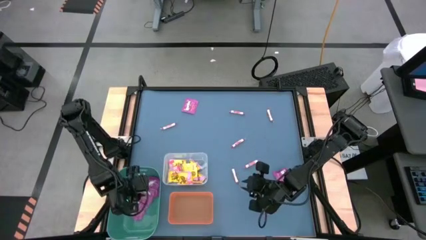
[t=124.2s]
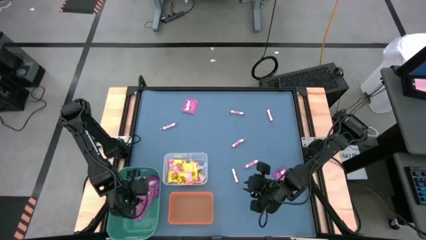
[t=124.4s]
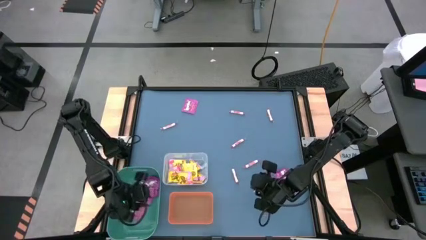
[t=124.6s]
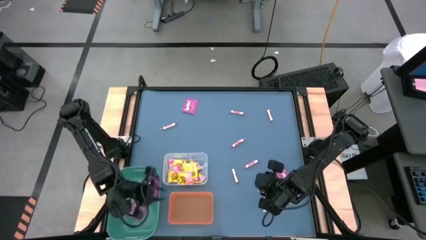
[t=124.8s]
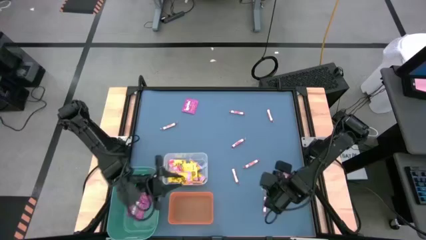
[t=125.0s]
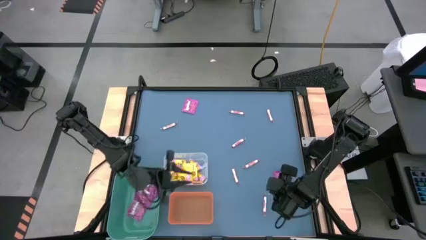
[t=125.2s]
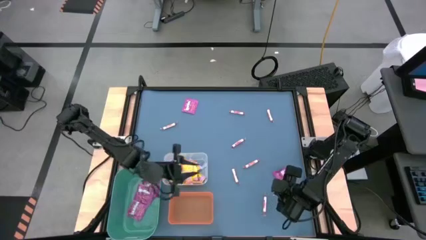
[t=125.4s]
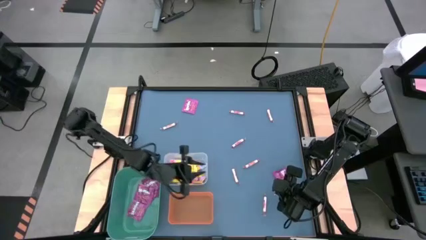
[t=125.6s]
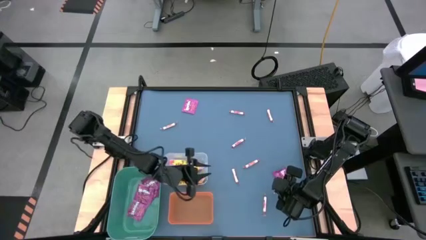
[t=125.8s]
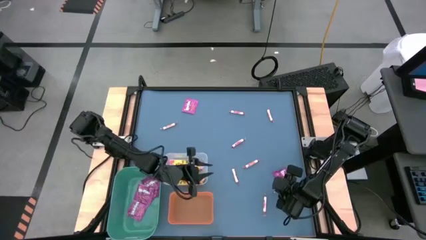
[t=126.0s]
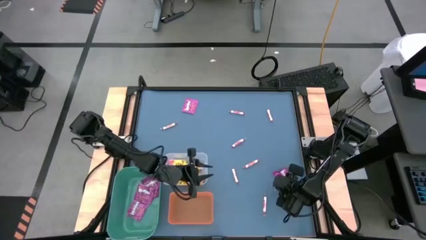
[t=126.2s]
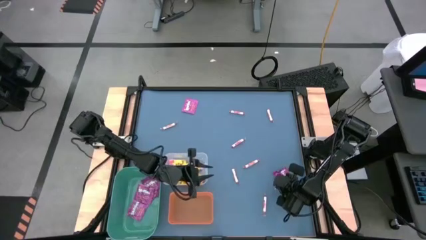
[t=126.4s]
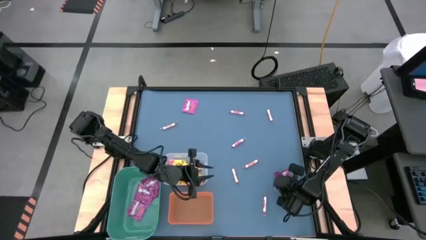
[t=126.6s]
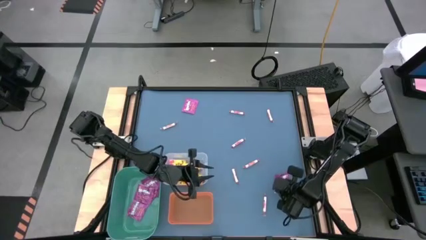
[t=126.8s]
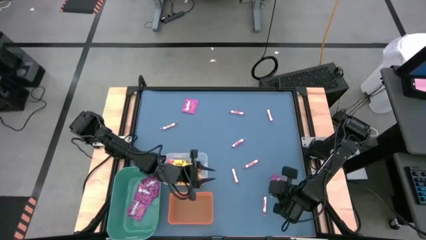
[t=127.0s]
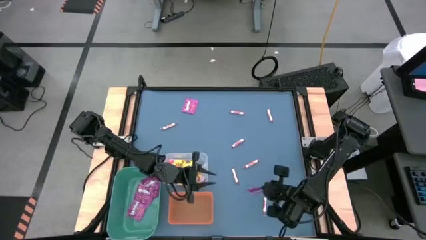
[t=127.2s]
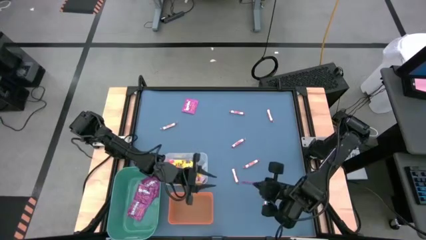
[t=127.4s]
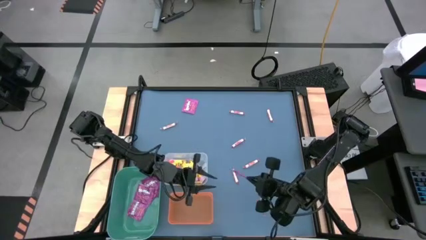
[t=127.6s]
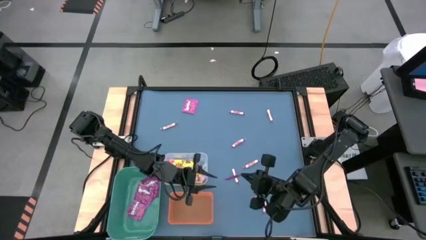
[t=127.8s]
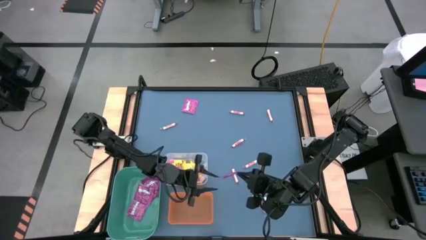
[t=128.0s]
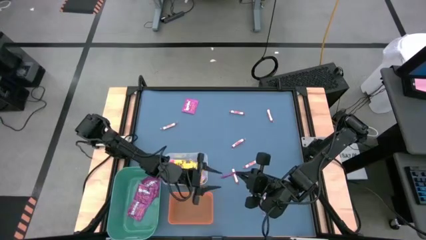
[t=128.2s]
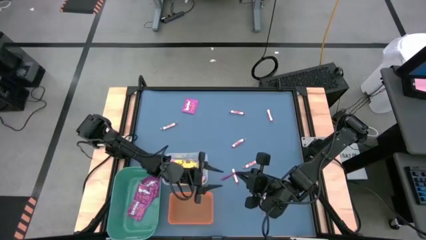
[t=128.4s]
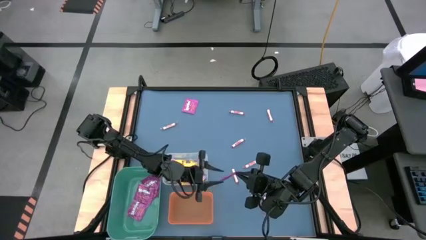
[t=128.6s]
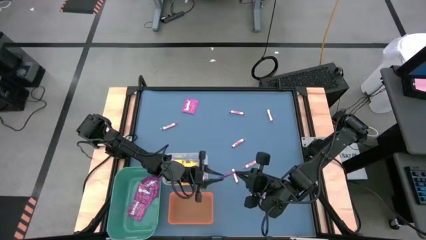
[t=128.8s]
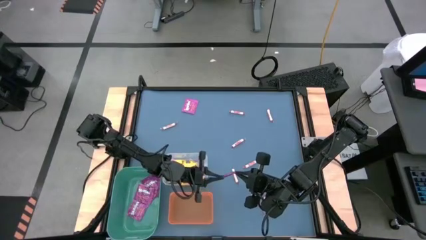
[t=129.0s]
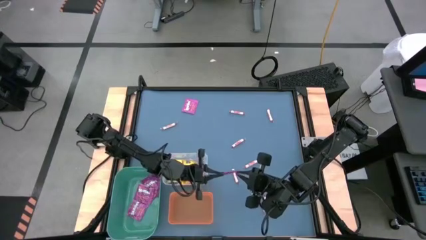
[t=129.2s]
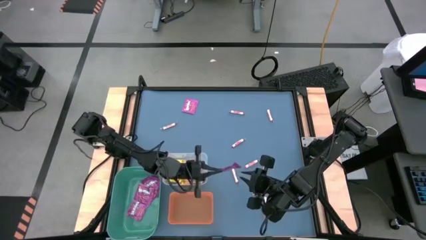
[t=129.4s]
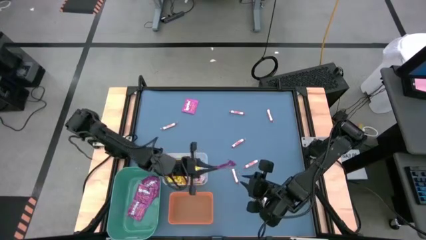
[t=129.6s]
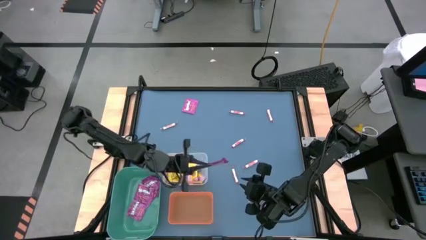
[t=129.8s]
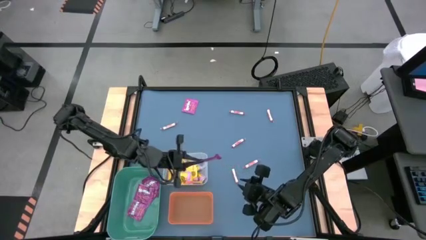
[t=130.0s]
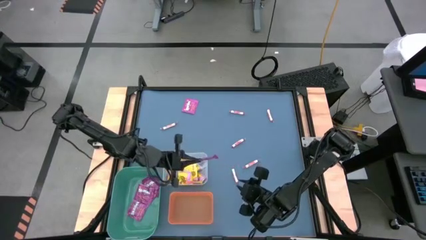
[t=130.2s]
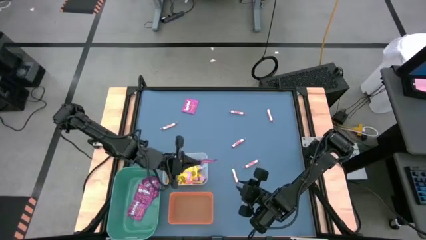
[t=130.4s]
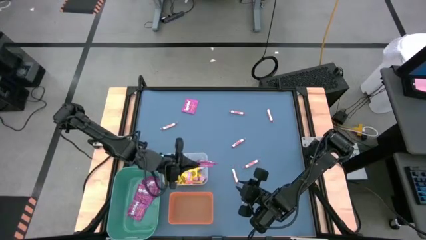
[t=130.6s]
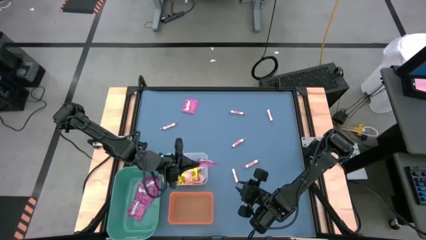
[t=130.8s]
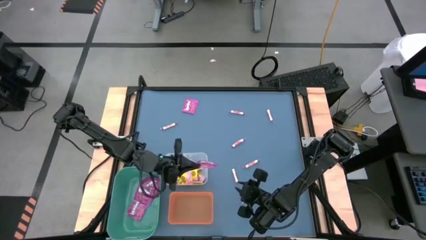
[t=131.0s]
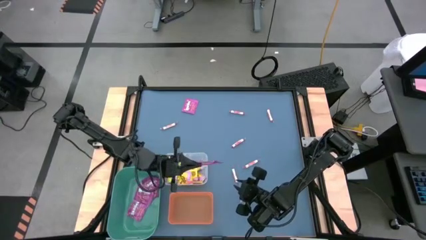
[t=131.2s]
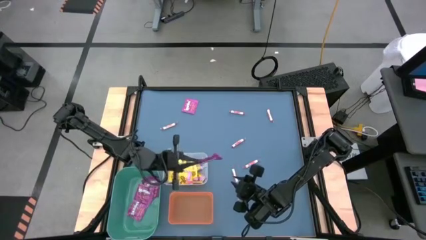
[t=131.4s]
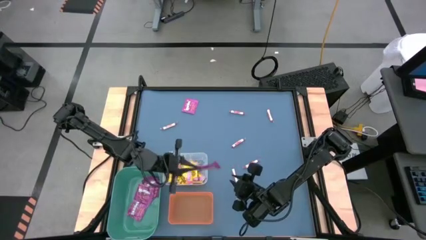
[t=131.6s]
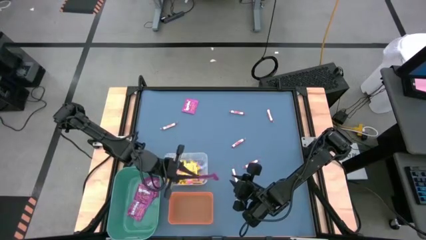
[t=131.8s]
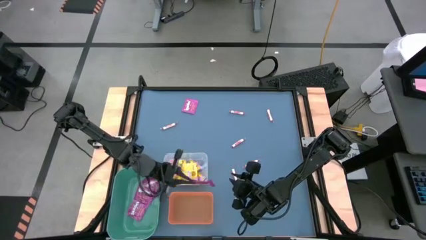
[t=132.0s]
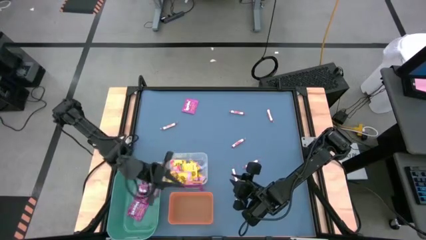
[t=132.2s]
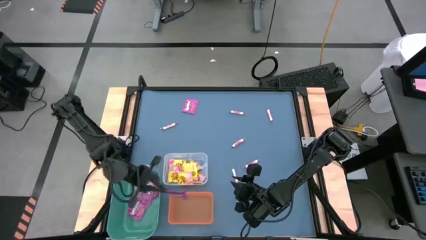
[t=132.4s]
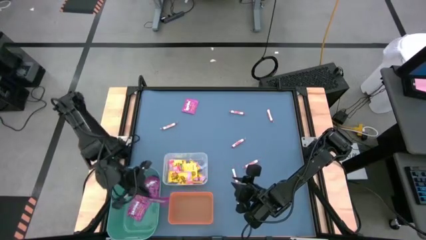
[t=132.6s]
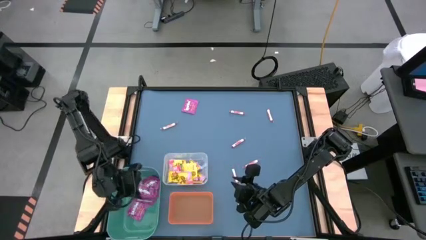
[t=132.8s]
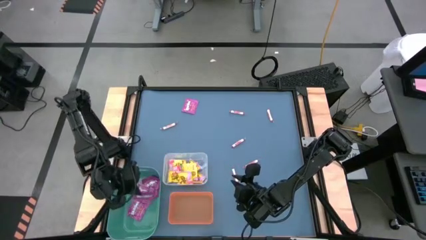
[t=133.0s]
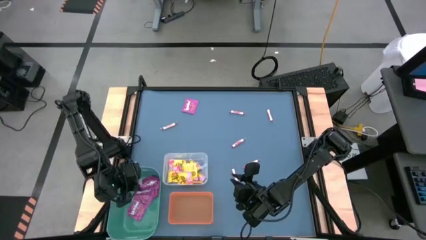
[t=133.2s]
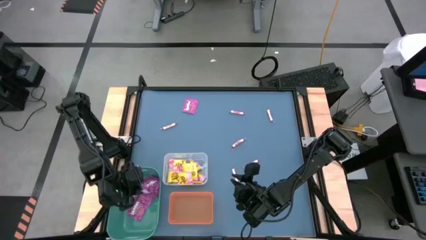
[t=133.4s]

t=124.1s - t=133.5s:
Task: Sort candy
Put the purple candy into the green bin
